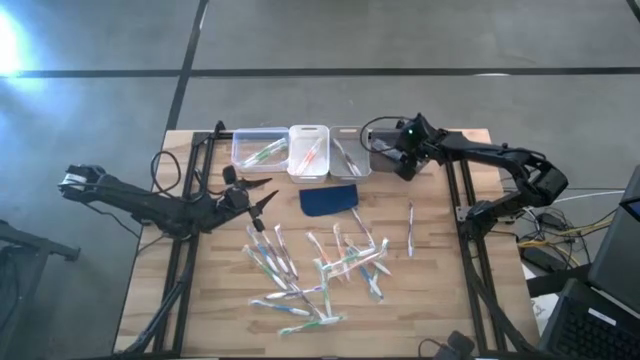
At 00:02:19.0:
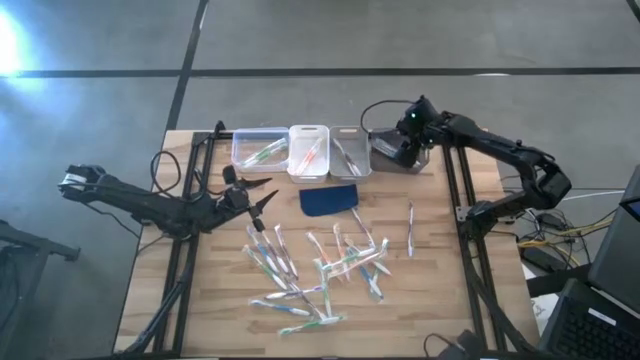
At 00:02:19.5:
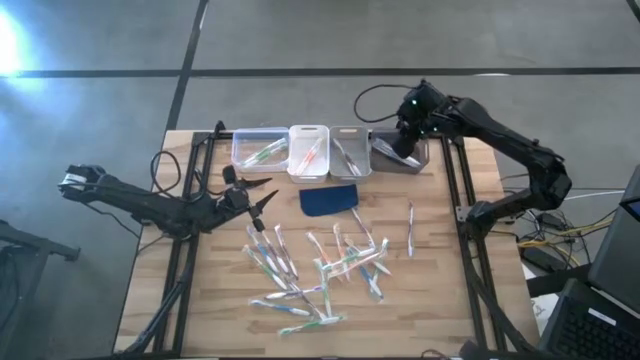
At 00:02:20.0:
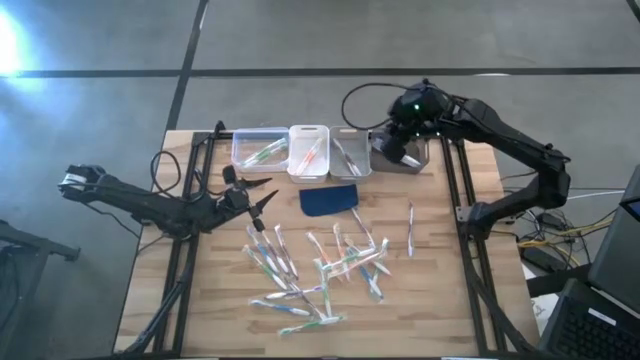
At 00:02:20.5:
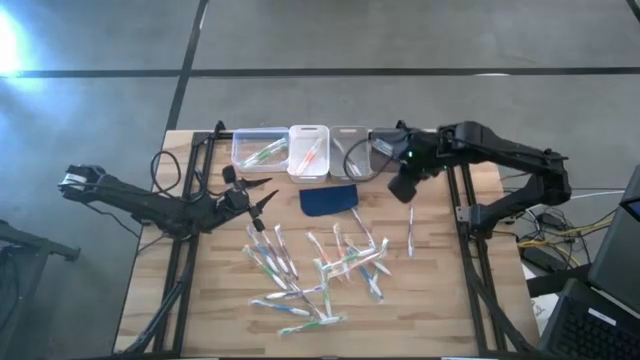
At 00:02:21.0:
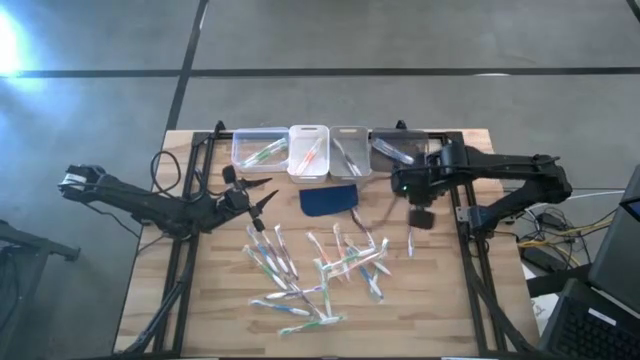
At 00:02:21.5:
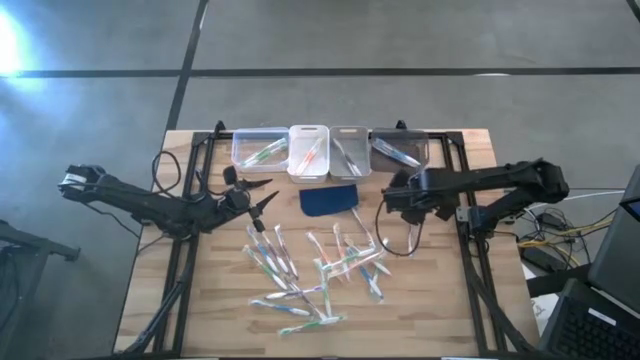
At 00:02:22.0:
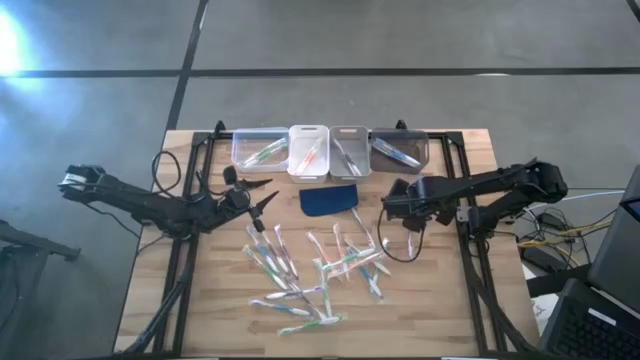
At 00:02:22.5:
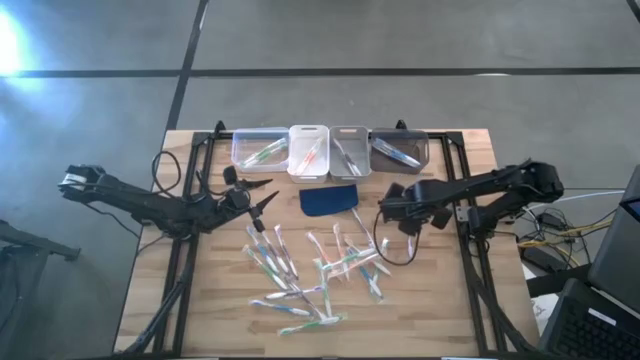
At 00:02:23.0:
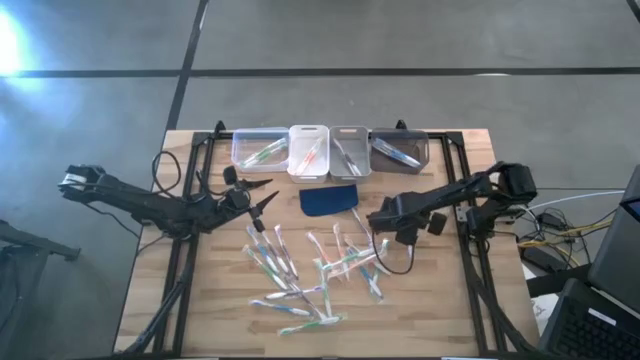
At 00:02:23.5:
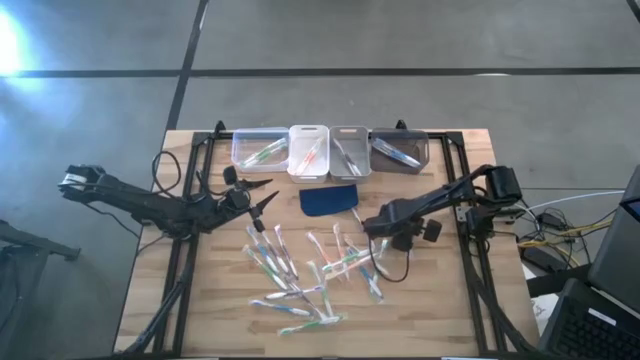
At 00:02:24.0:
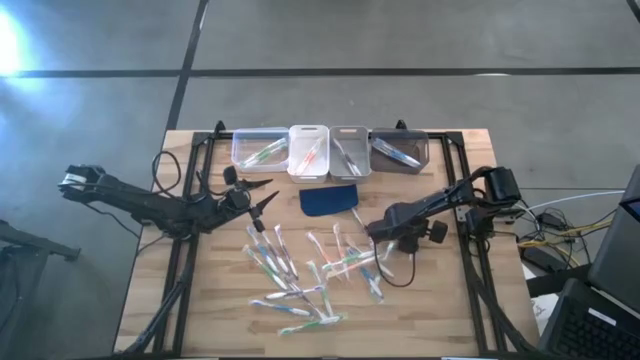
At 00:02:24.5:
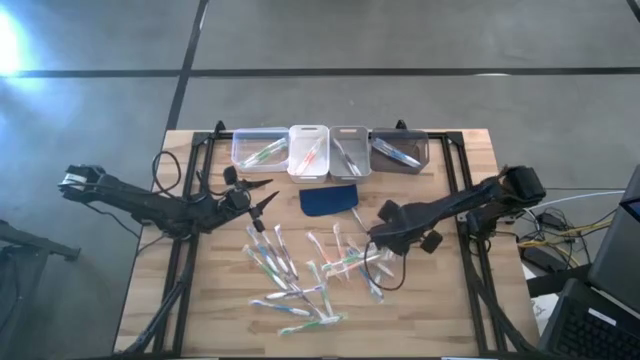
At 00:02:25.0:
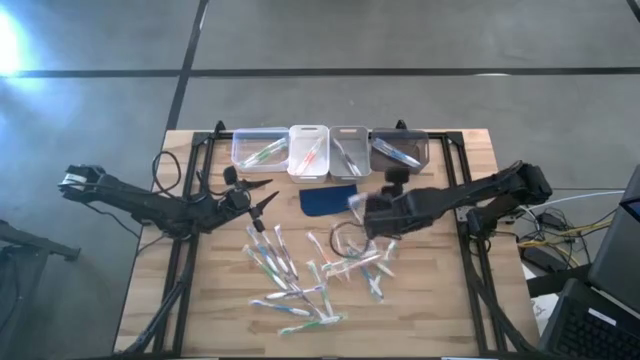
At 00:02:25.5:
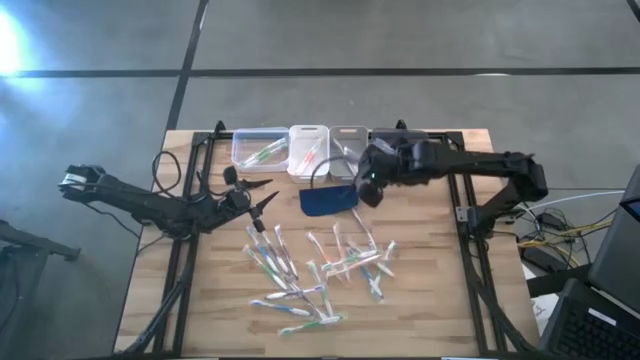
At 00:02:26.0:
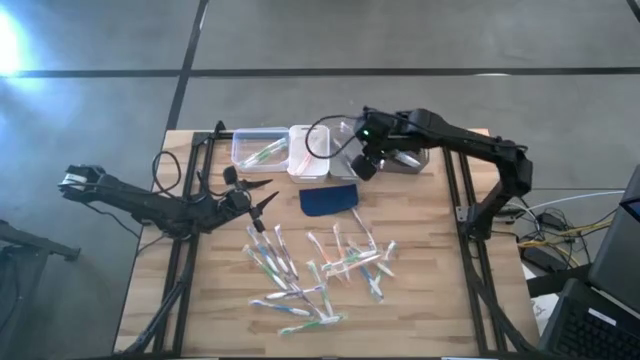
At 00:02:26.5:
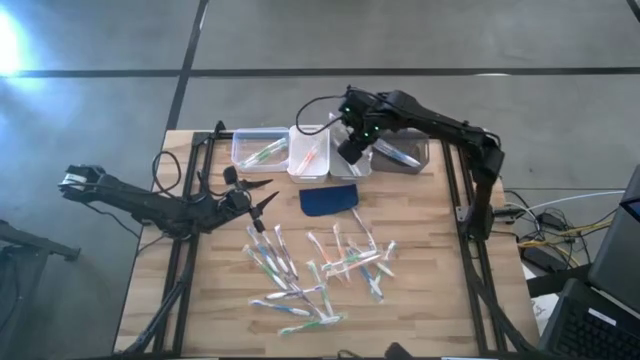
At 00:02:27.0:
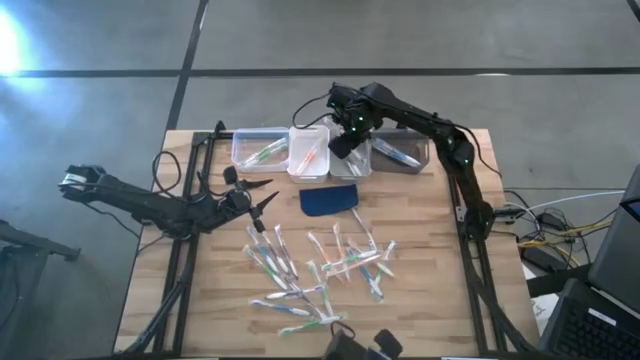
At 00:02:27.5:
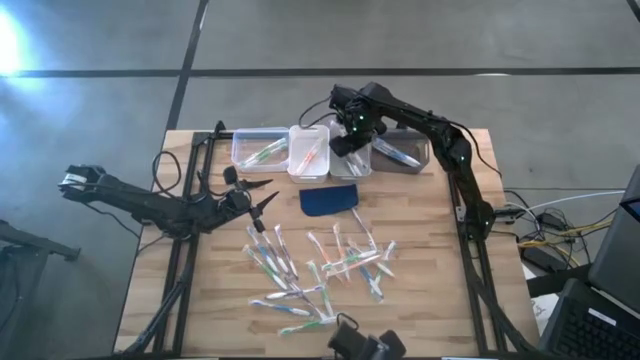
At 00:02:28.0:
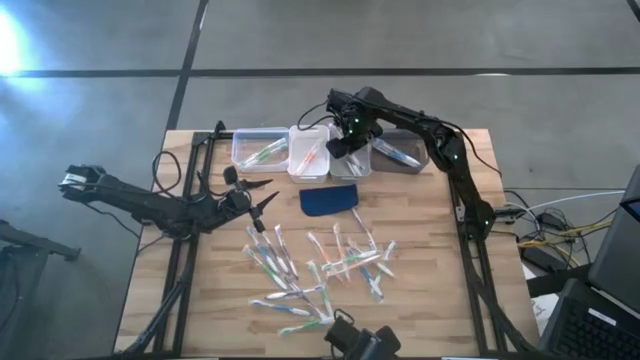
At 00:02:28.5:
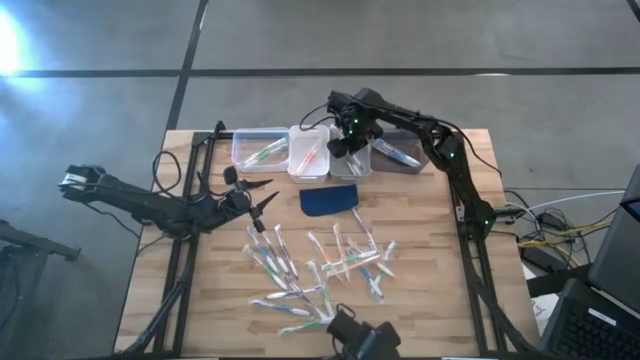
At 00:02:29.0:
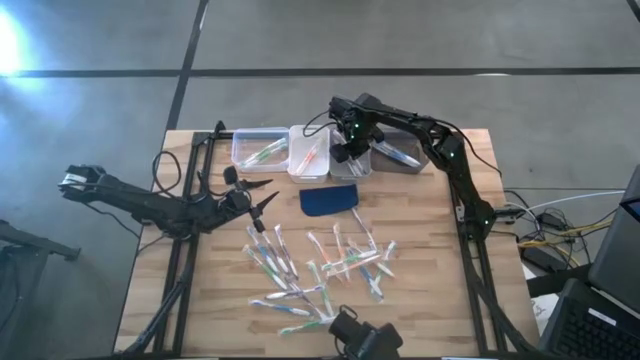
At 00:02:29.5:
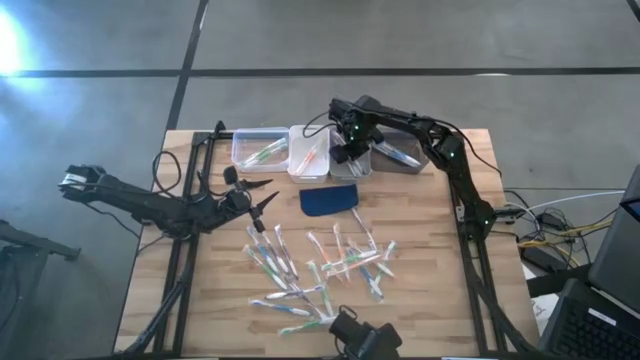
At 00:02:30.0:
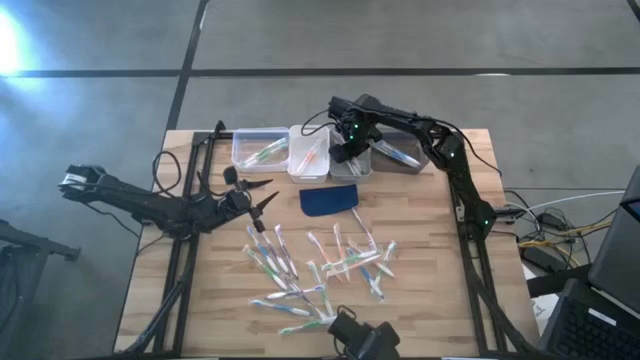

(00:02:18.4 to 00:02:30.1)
Task: Pick & Place Toothbrushes
Put the violet toothbrush into the gray bin

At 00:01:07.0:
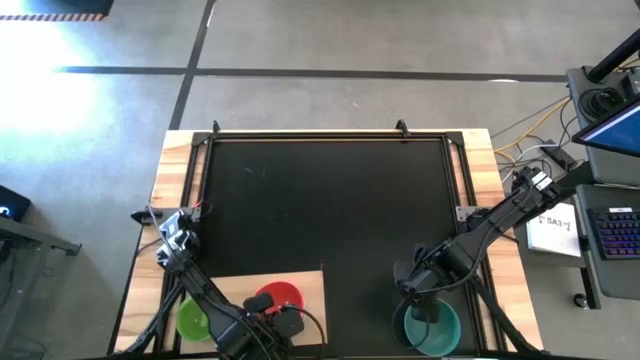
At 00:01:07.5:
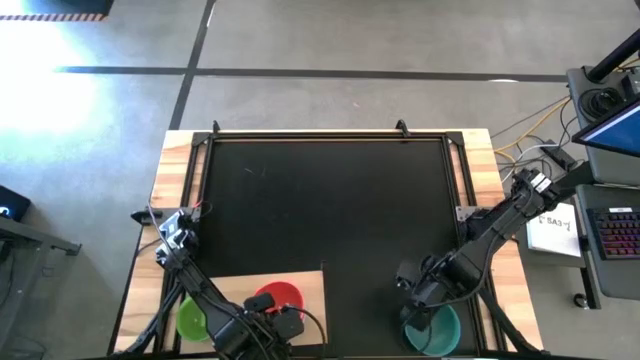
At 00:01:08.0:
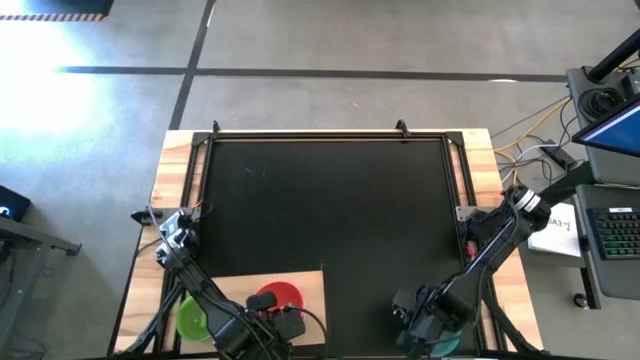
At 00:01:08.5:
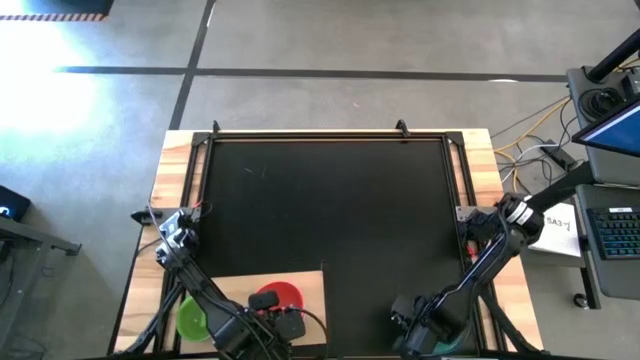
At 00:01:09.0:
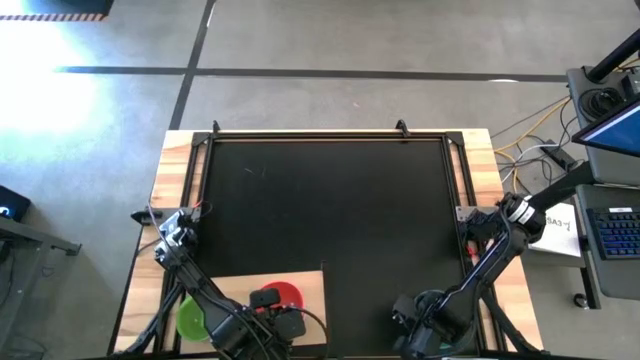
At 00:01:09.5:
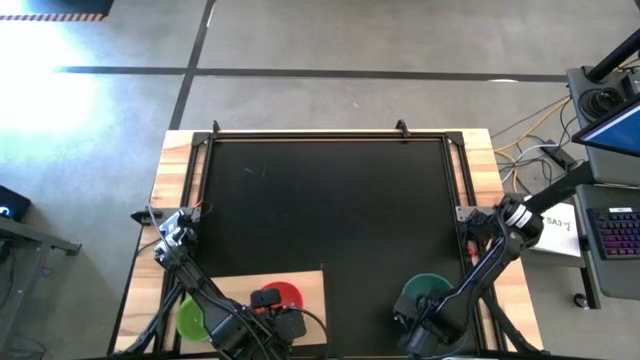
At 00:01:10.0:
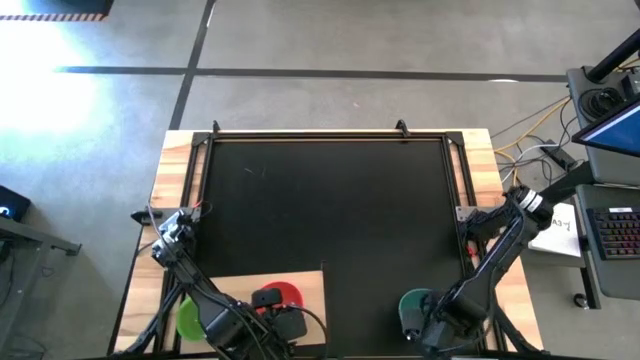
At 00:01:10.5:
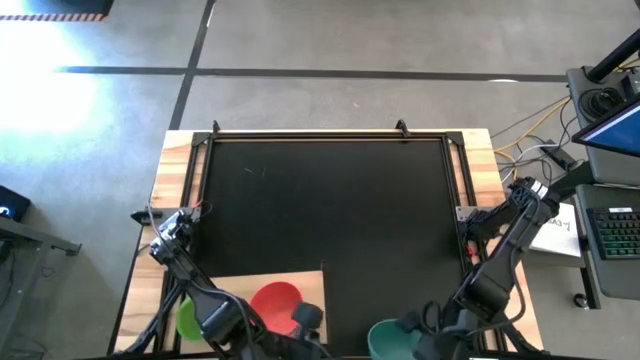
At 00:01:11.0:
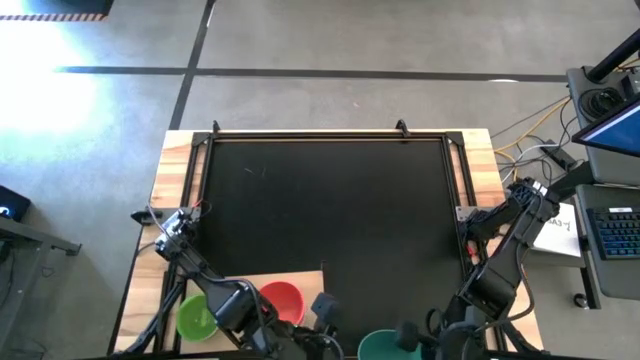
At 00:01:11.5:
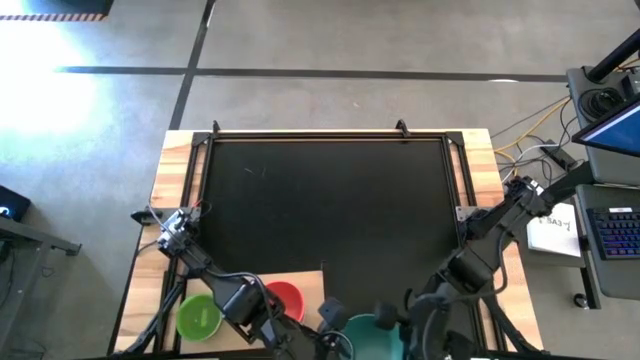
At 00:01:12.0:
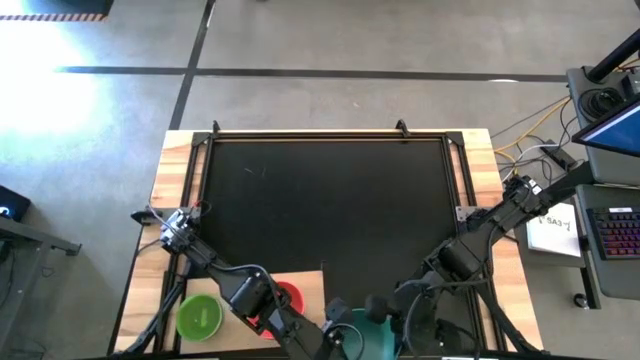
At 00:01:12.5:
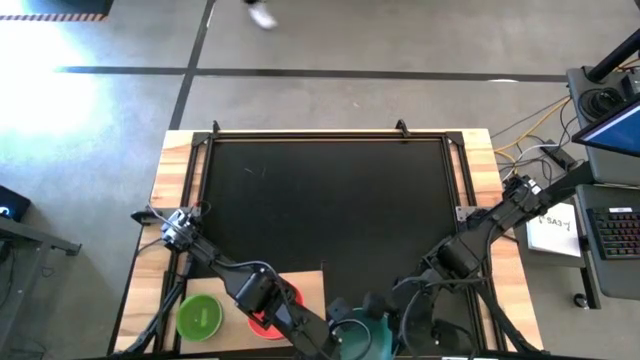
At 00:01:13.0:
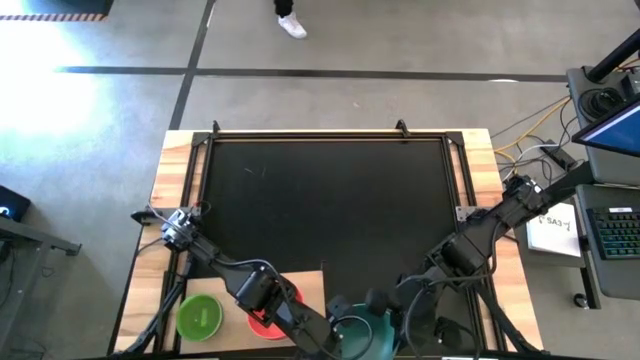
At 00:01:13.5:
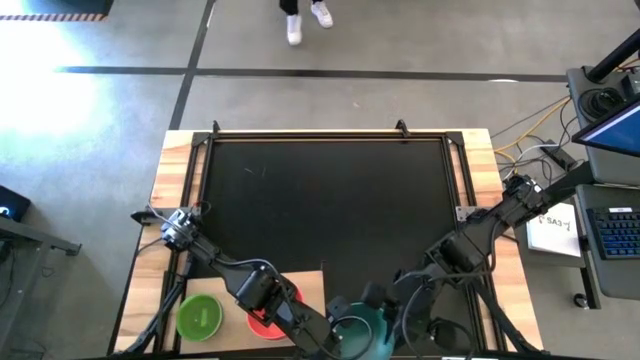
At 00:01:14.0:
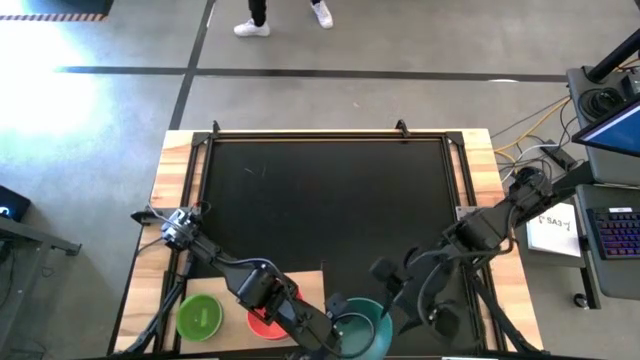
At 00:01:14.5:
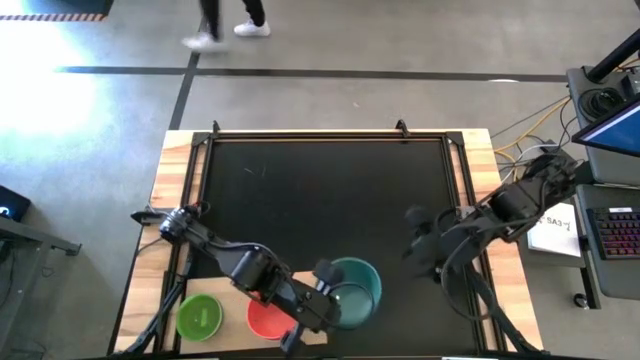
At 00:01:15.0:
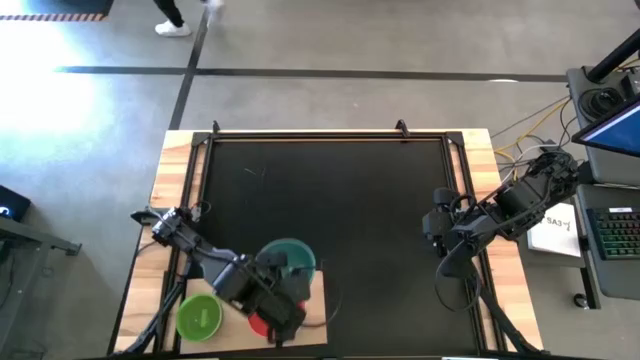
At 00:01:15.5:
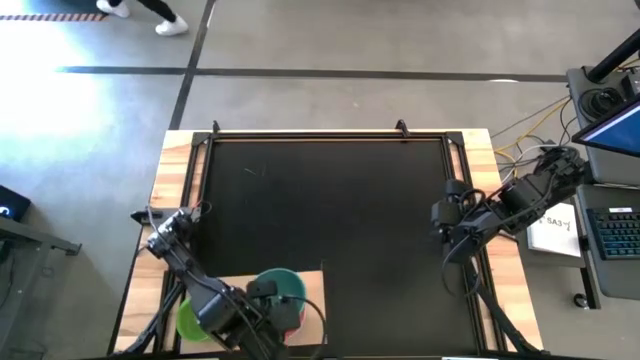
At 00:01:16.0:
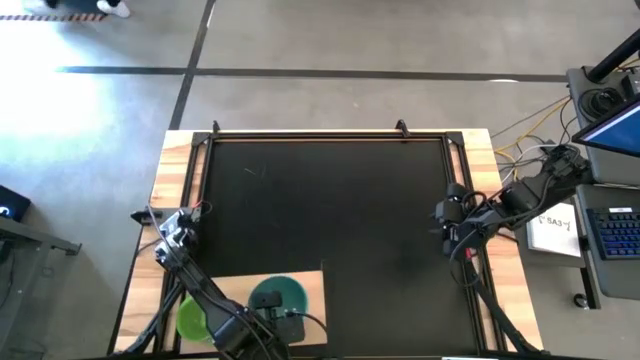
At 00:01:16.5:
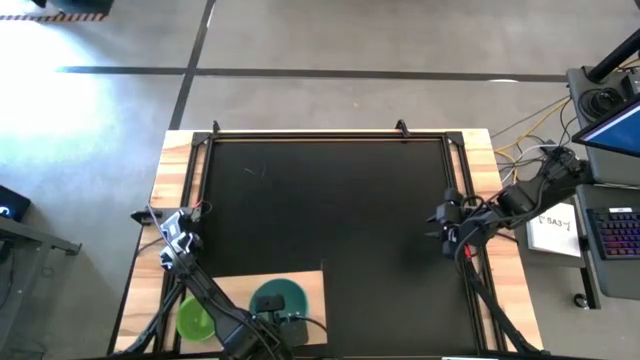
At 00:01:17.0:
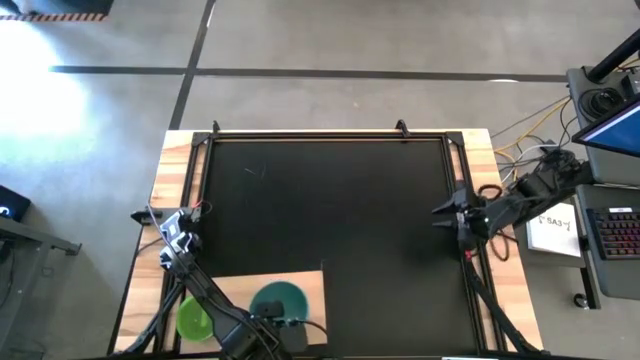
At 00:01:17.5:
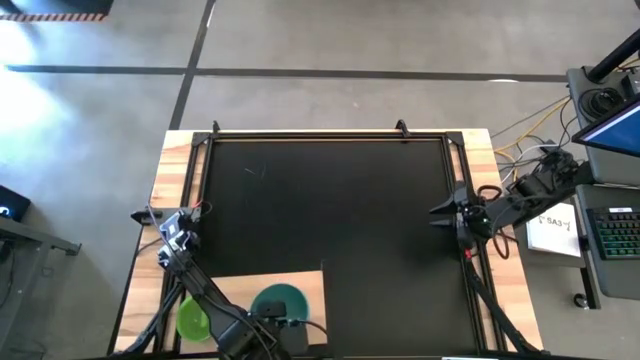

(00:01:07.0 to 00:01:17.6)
Task: Place and stack bowls onto a shelf
Stack the green bowl on top of the orange bowl on the shelf
